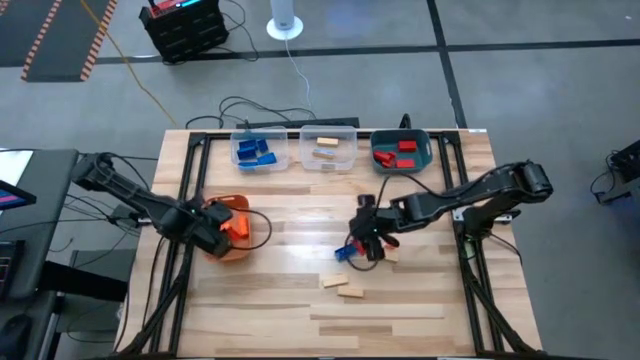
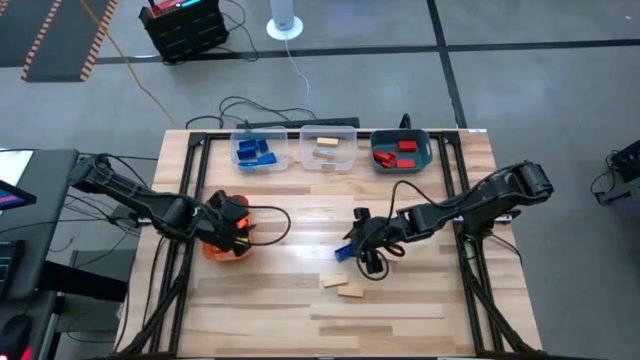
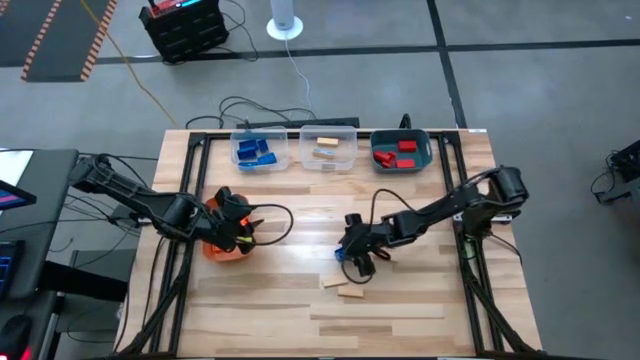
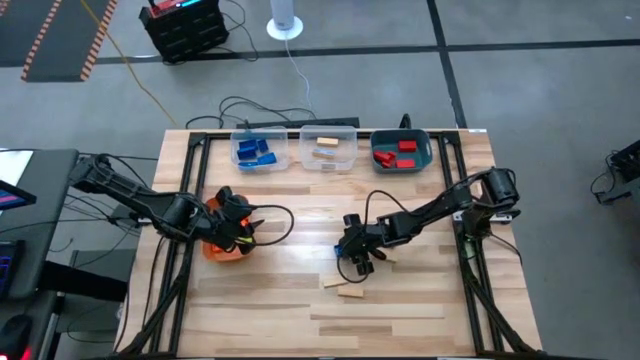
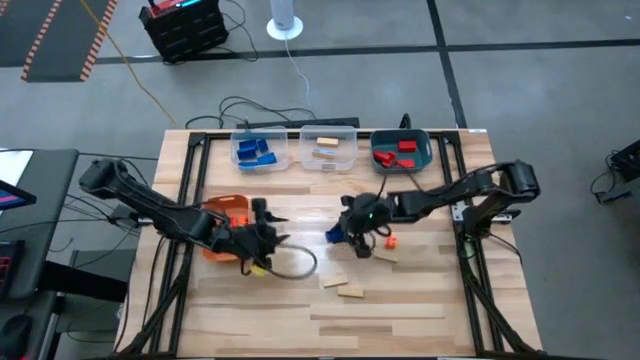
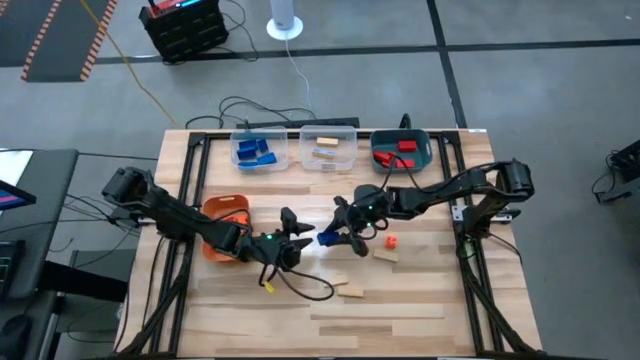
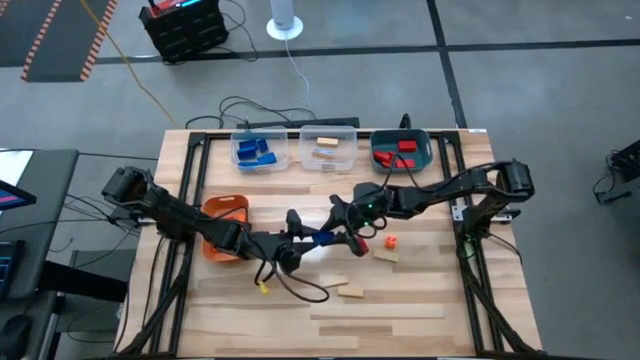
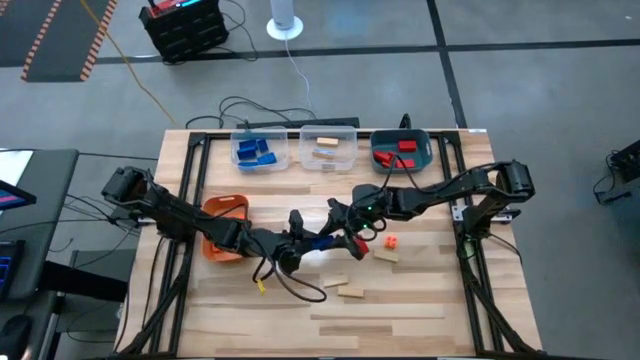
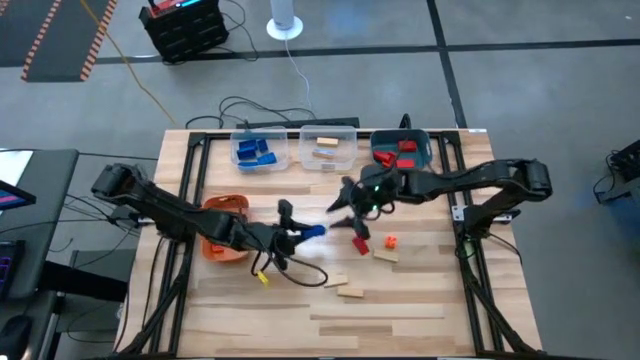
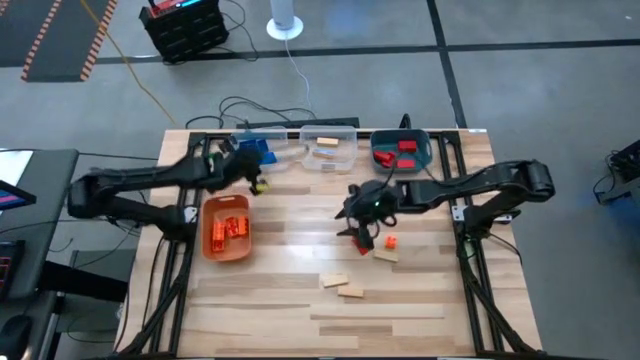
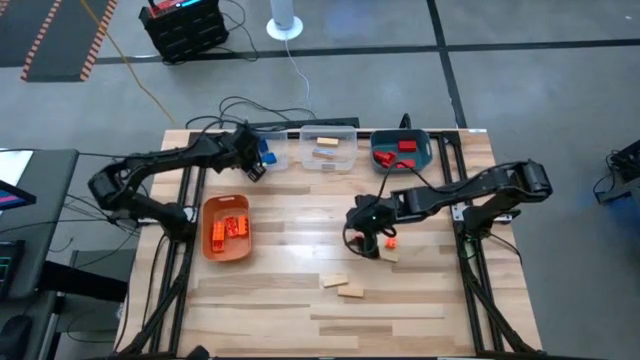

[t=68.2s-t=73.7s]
Task: Sort blocks
Put the blue game piece into the left transparent bin

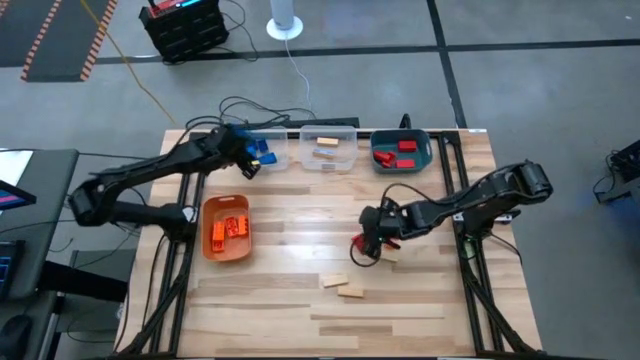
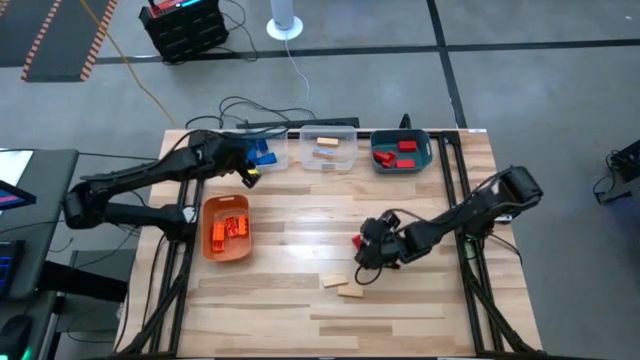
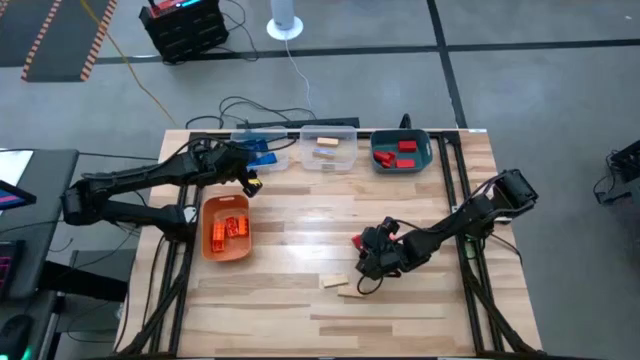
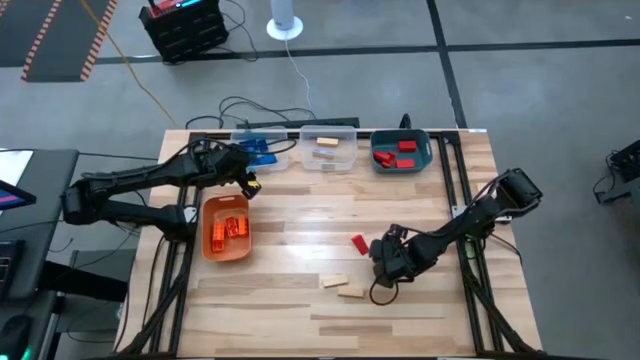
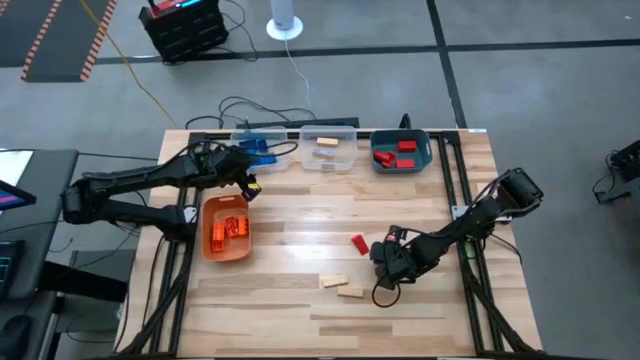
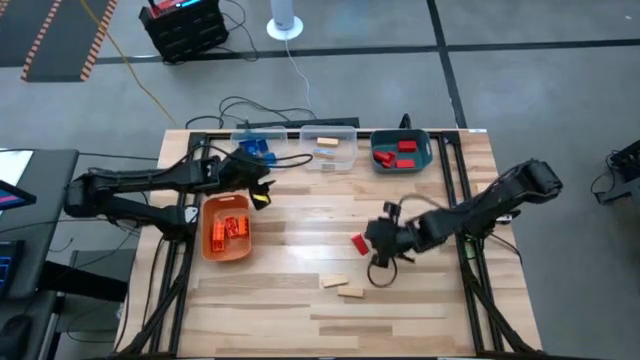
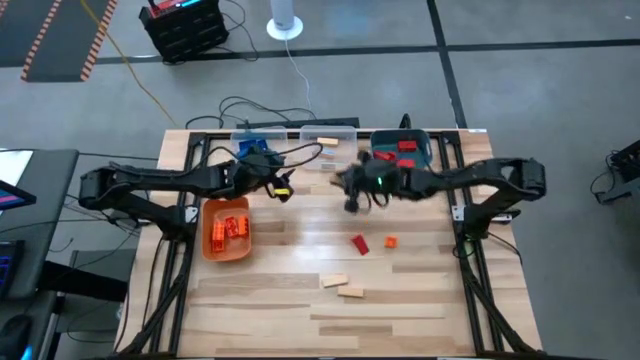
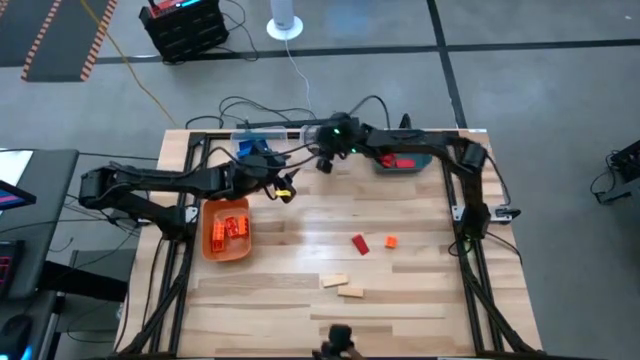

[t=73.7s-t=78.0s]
Put the light brown block into the right transparent bin

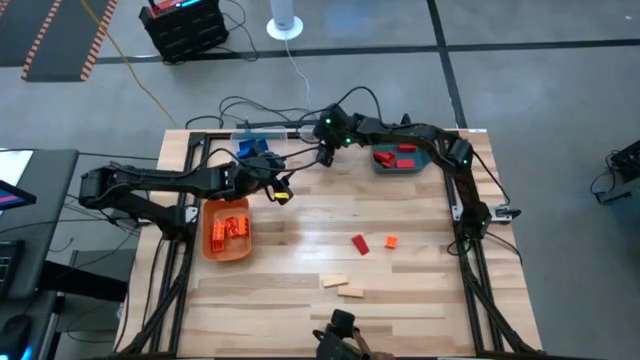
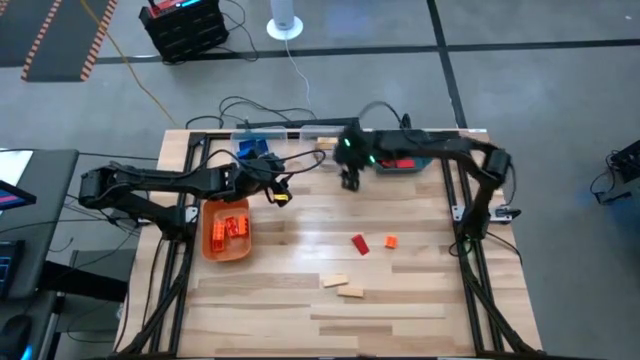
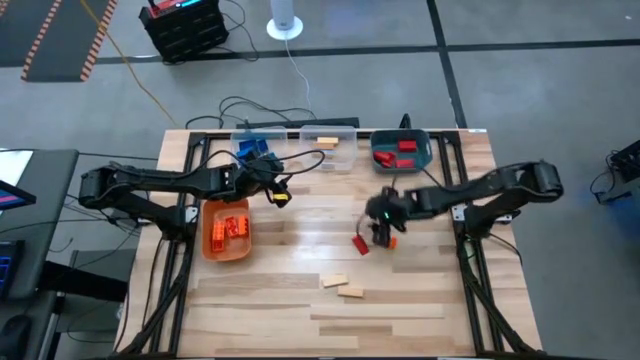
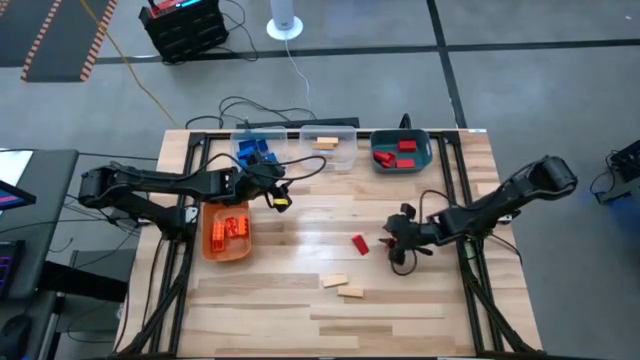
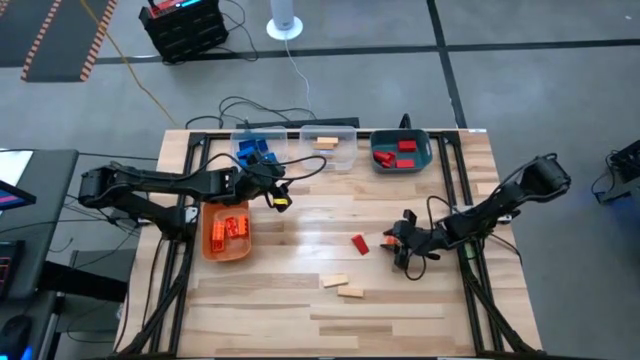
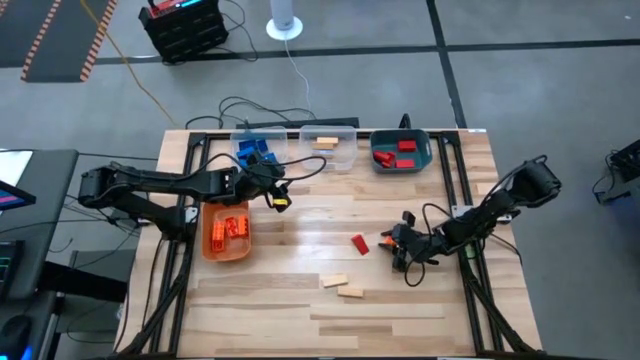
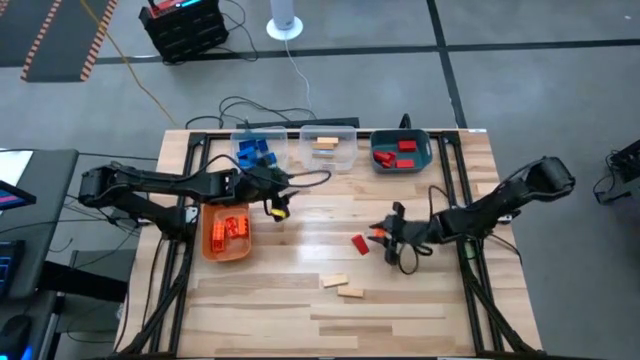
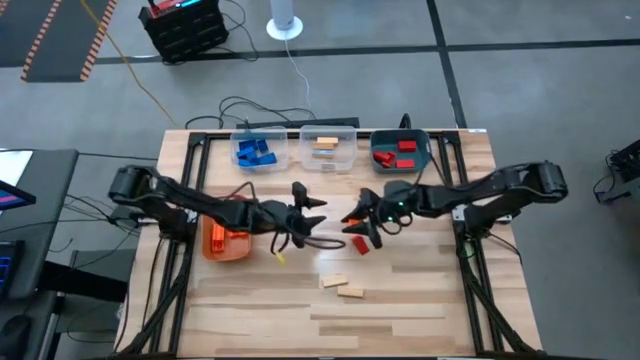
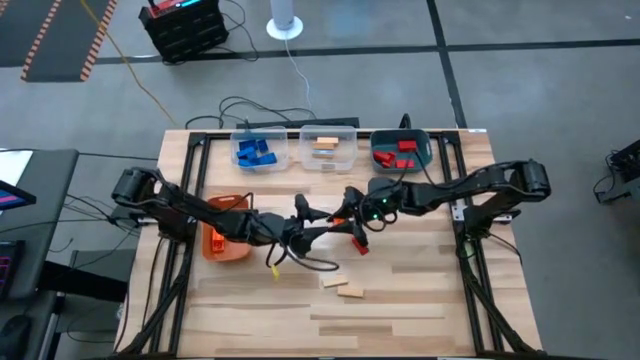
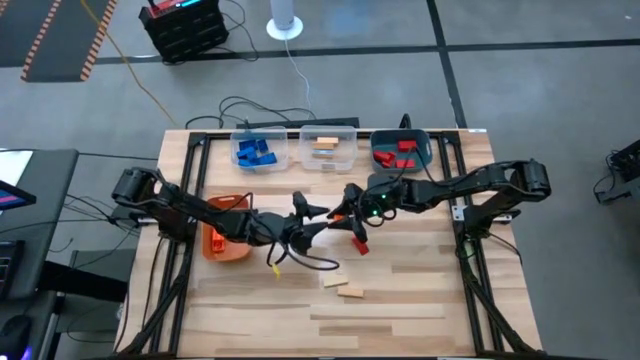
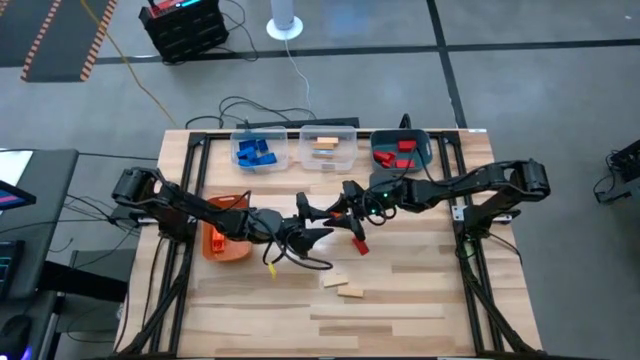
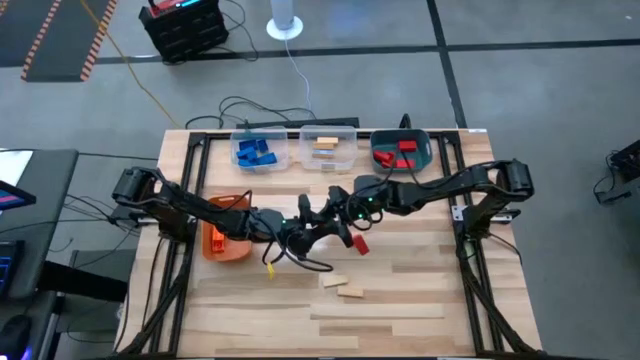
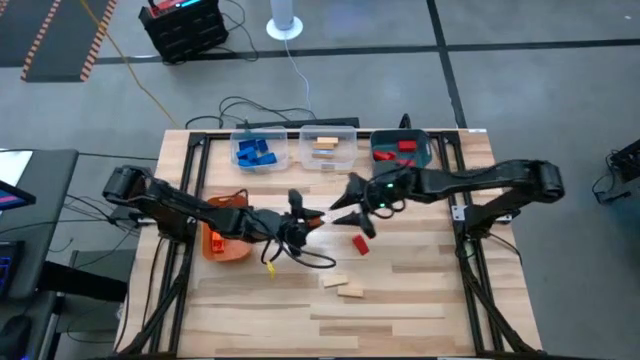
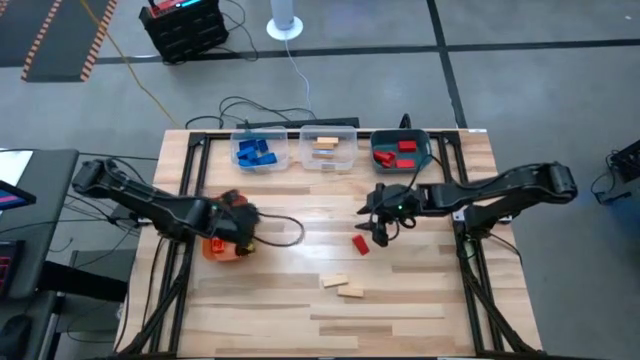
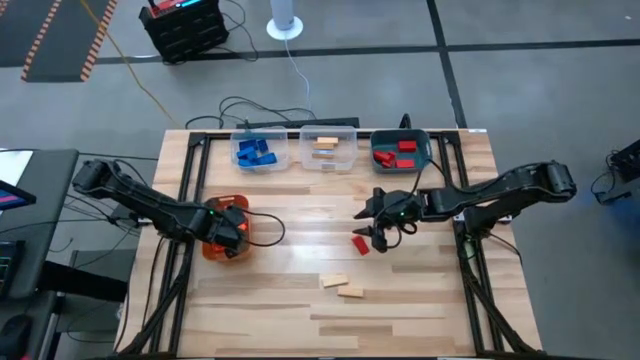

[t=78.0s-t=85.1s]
Put the orange game piece into the orange bin

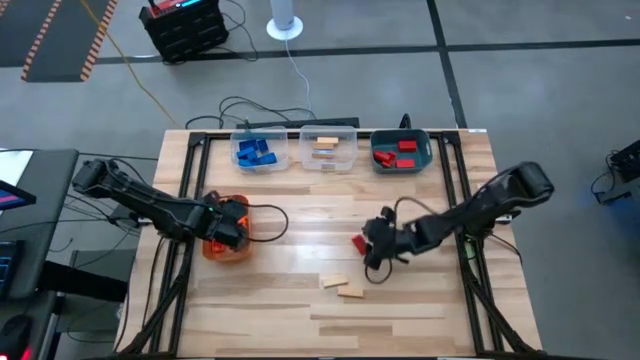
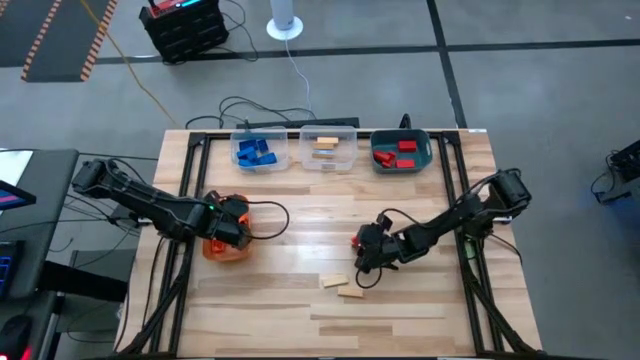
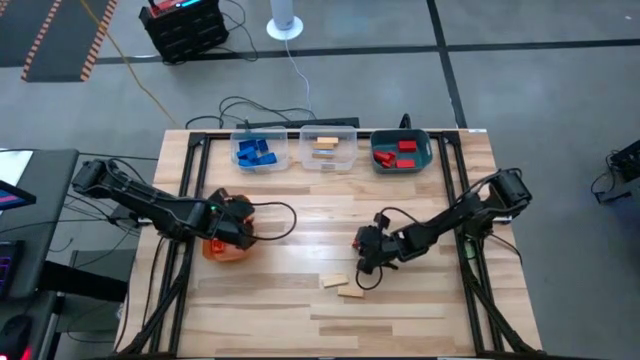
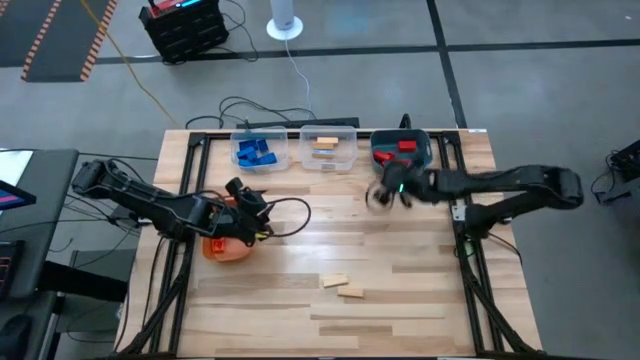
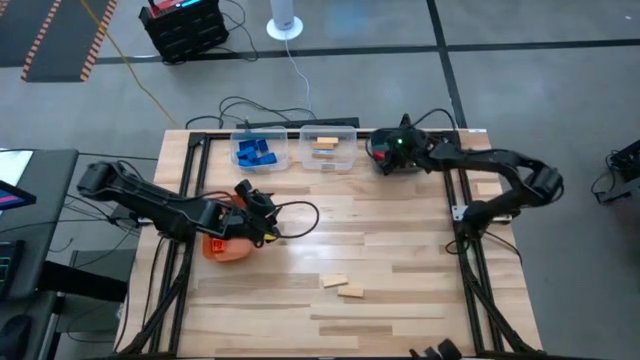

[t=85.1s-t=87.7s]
Put the red block into the blue bin

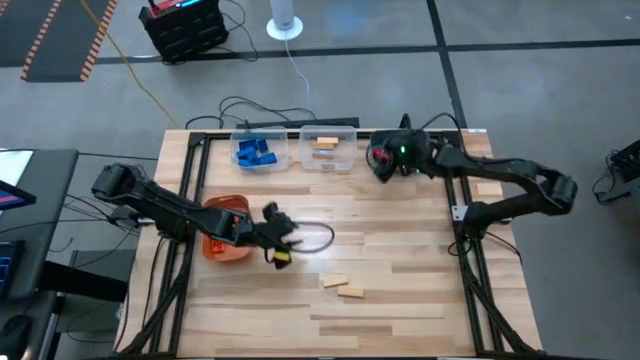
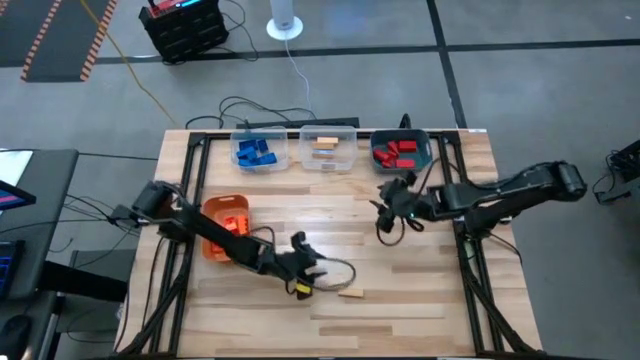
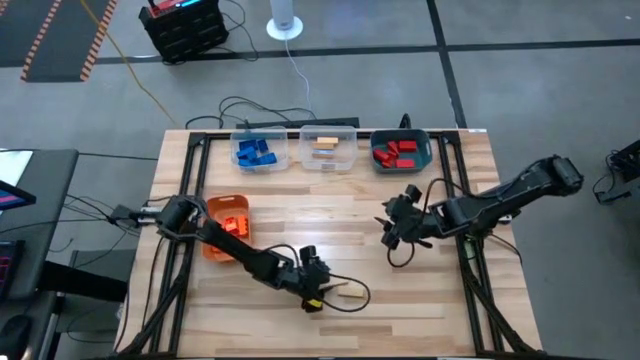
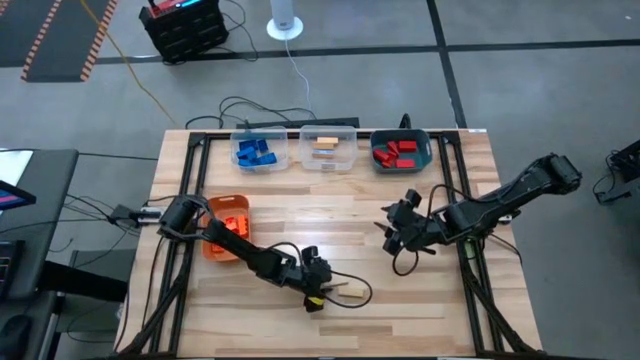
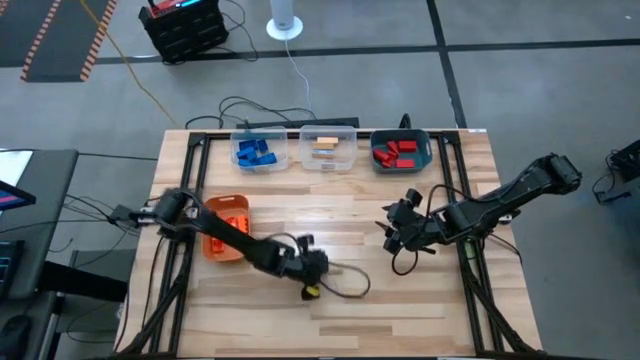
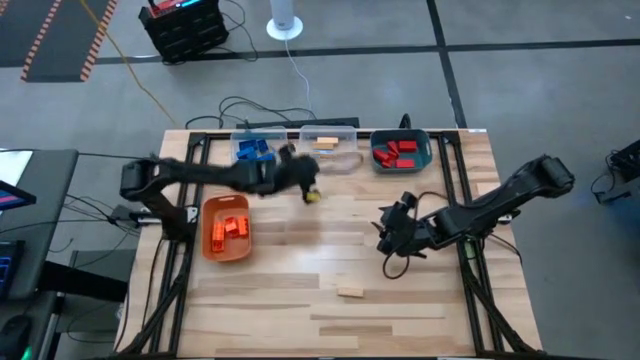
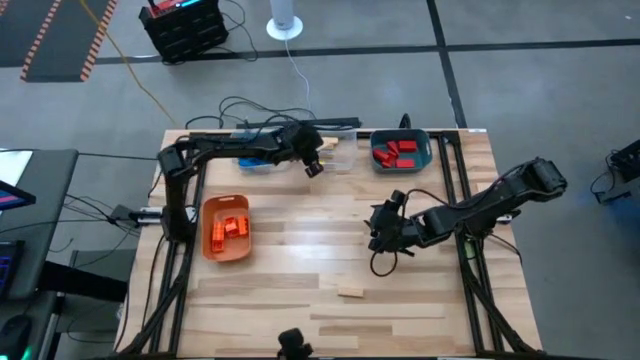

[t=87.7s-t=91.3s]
Put the light brown block into the right transparent bin
